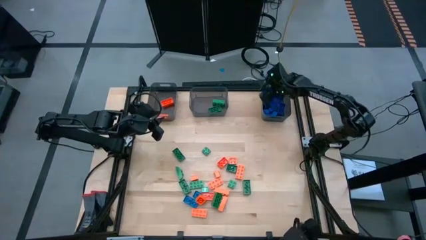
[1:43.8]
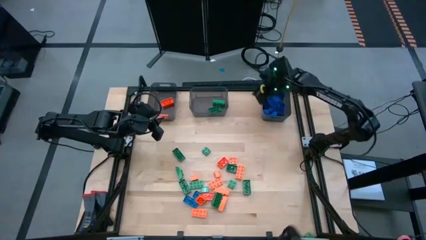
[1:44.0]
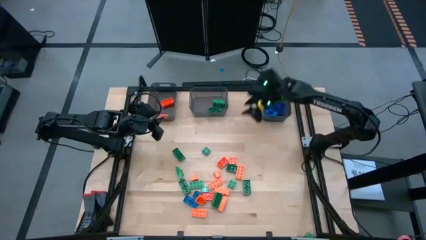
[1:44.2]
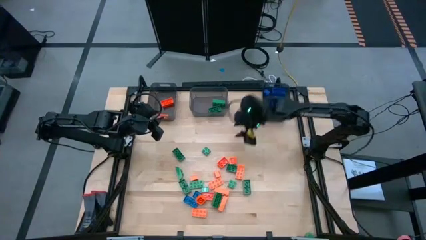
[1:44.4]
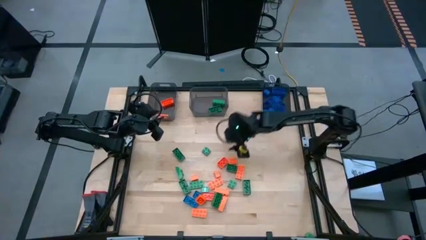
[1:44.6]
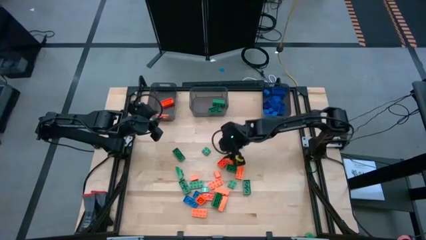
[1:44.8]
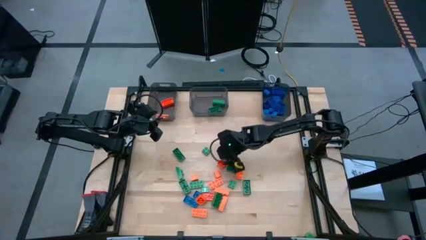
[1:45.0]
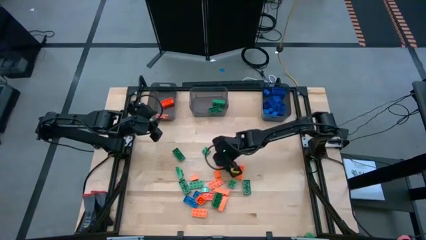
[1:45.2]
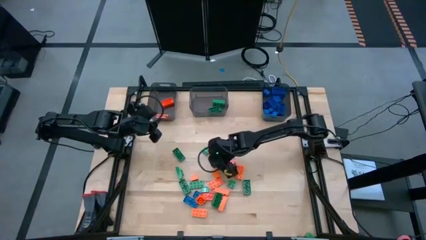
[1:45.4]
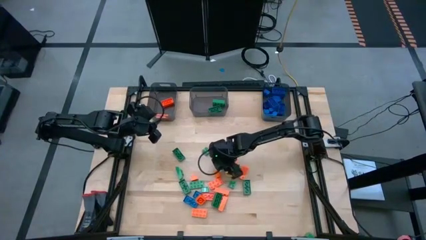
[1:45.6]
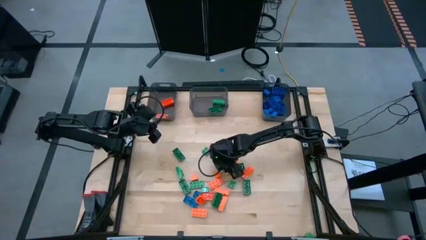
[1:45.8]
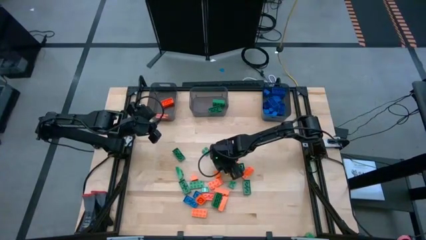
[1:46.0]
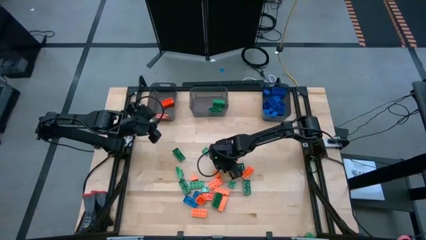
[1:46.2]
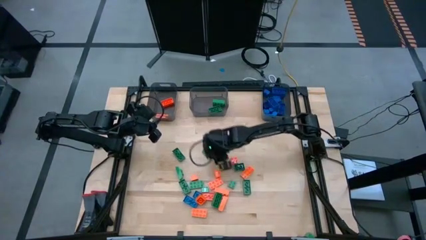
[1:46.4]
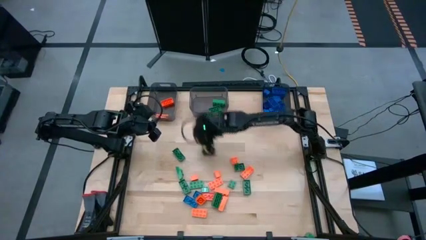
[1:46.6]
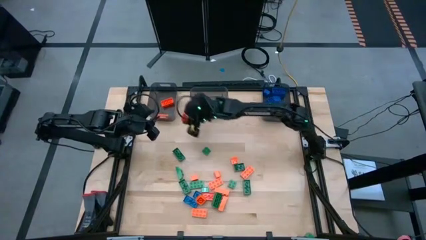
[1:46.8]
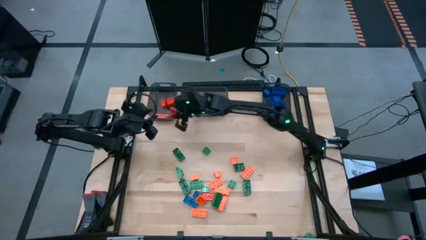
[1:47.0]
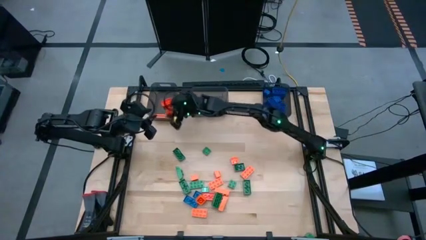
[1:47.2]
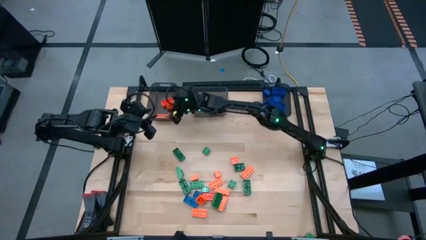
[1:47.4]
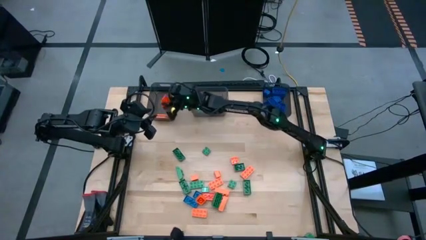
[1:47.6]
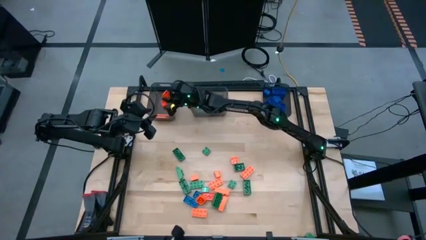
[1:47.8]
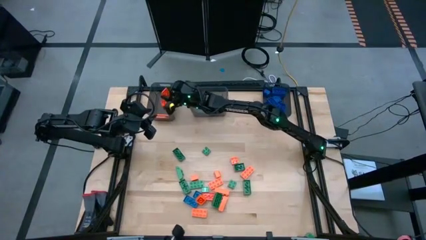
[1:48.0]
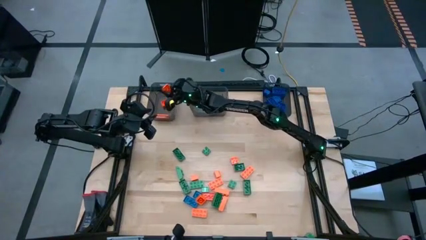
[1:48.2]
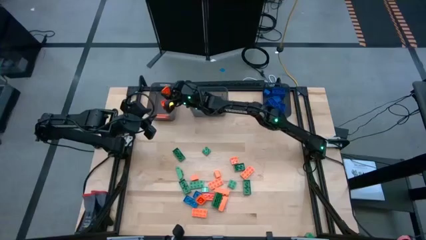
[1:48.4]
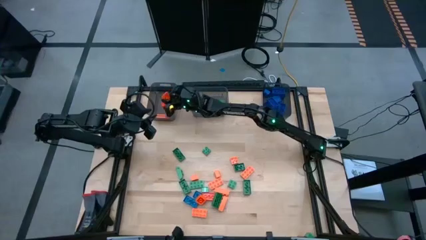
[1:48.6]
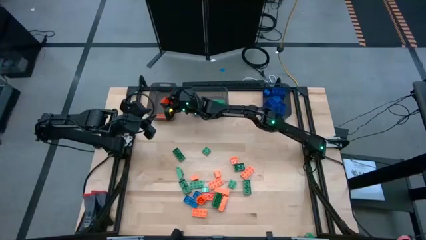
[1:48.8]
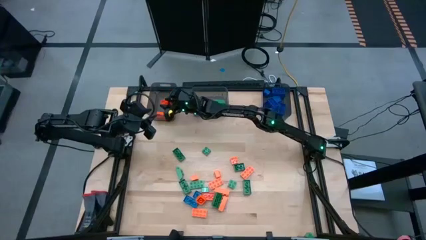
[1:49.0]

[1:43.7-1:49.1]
Task: Sort blocks
Put the orange game piece into the left black bin

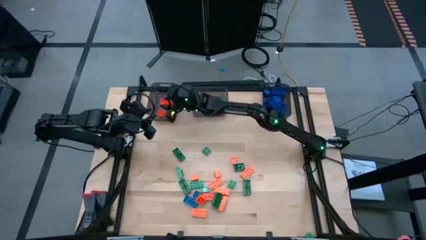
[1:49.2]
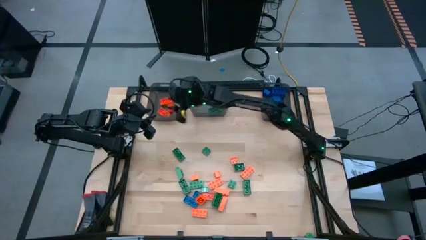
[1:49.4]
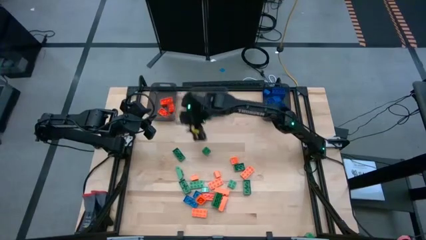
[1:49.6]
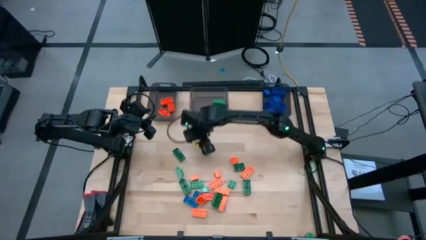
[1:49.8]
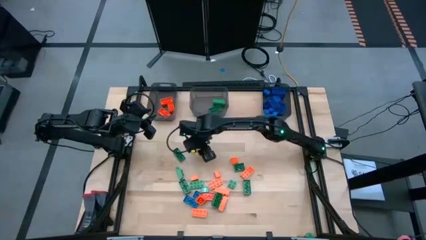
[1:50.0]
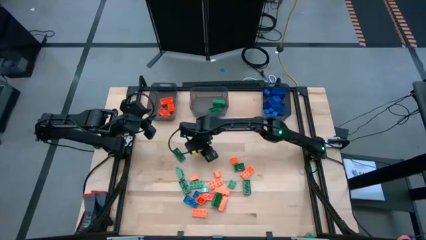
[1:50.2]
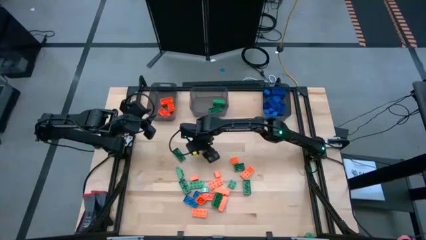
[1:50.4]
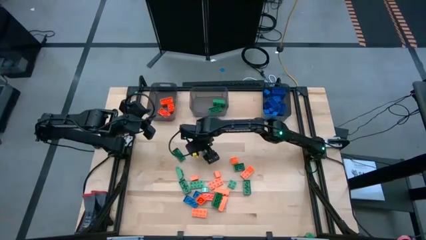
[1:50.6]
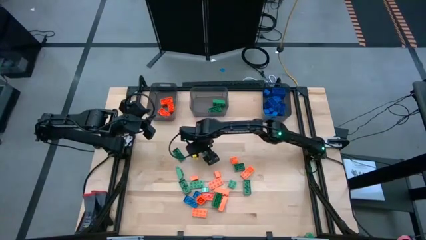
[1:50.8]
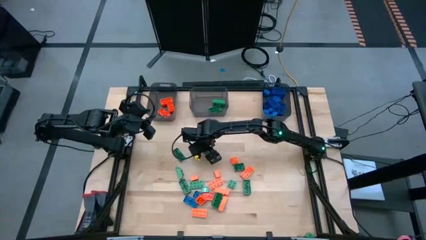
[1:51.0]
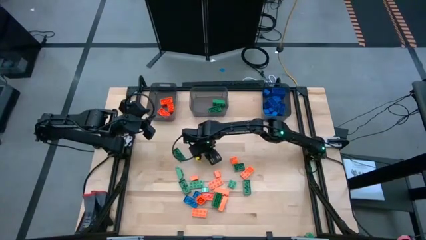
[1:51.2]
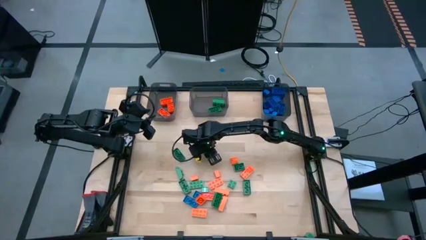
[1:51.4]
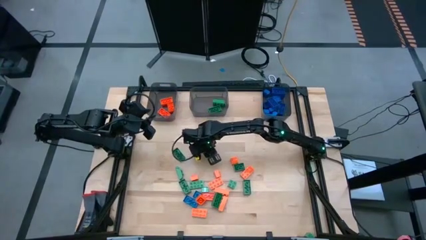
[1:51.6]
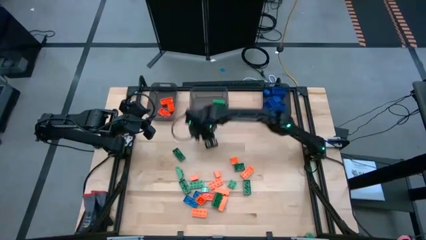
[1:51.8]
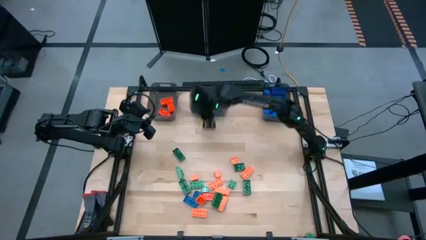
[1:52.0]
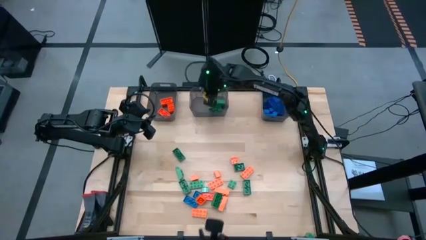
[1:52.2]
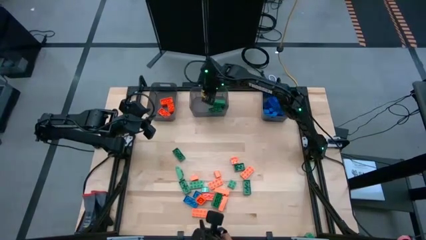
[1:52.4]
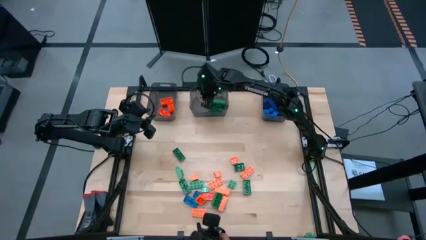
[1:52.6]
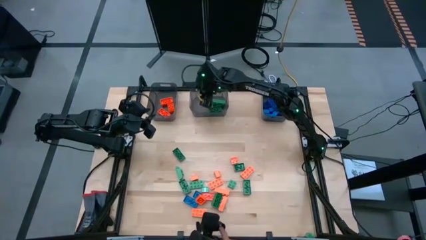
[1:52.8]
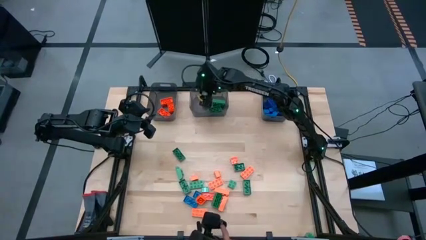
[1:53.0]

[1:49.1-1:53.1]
Put the green piece into the middle black bin

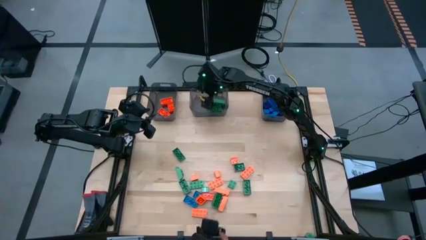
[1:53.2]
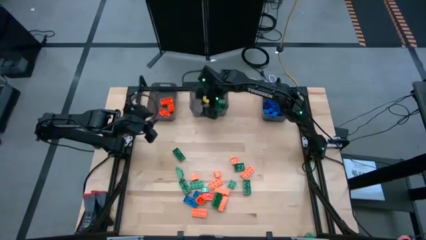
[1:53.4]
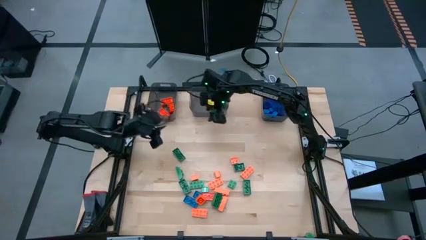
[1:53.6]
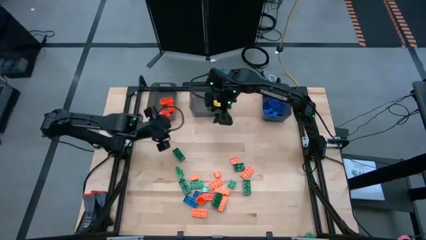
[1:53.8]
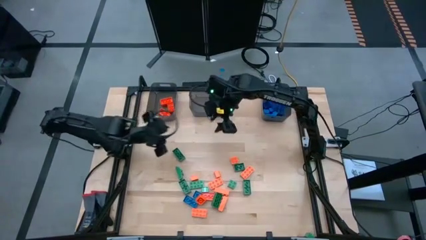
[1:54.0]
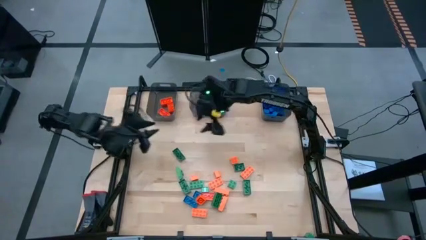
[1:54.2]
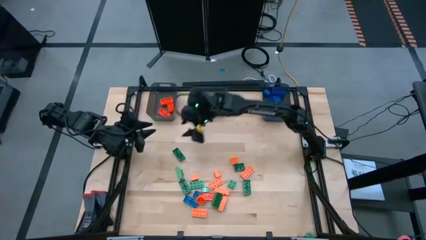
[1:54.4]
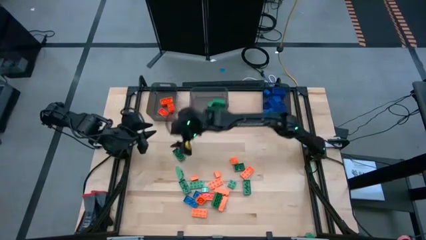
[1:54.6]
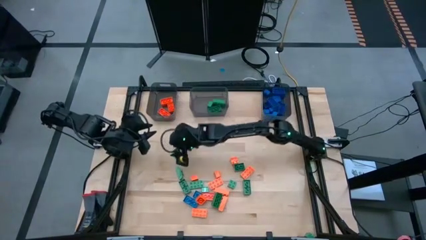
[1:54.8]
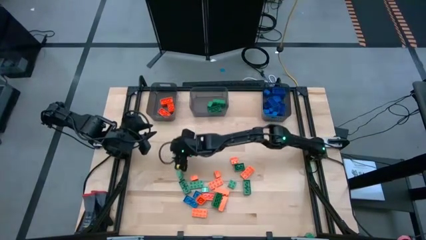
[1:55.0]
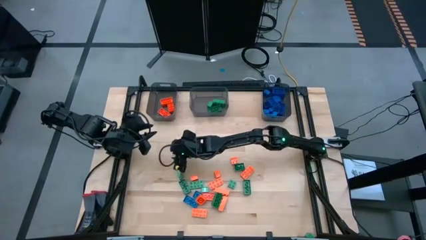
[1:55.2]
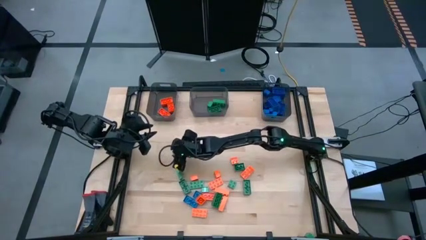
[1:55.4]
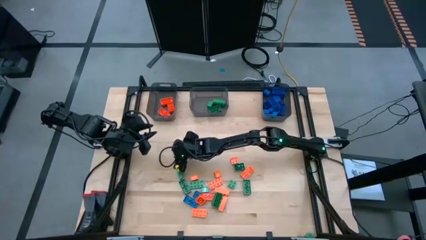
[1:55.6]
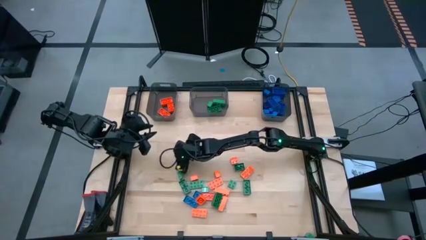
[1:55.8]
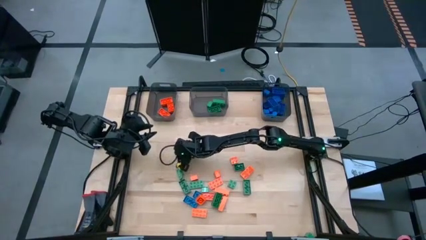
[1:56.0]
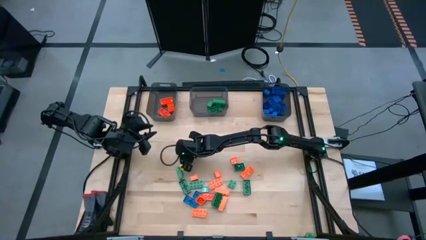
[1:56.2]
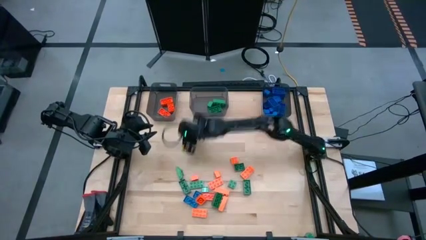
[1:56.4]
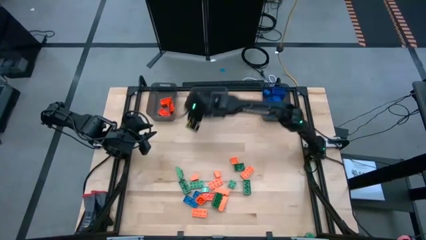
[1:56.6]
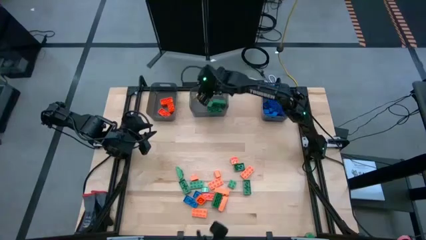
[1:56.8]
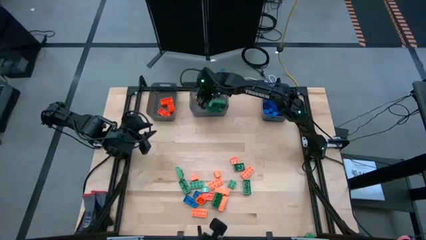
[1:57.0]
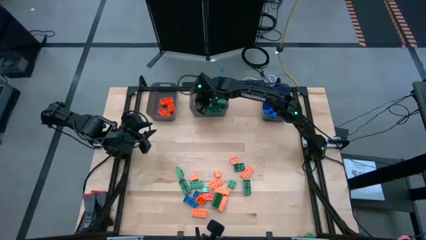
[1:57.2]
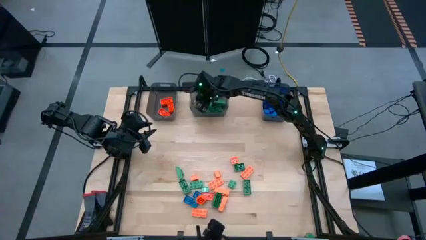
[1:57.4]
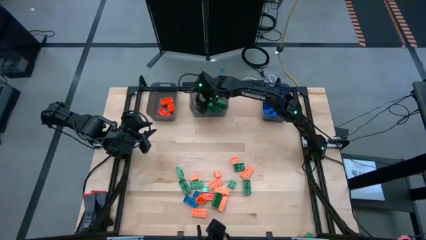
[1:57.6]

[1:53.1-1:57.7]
Put the green piece into the middle black bin

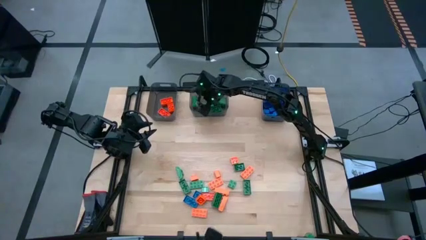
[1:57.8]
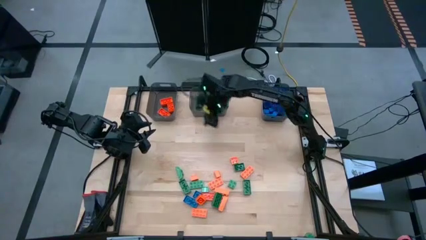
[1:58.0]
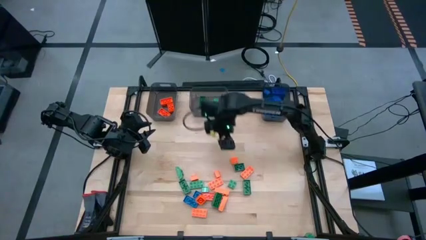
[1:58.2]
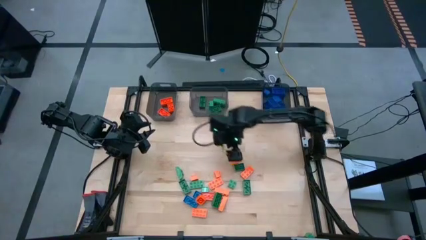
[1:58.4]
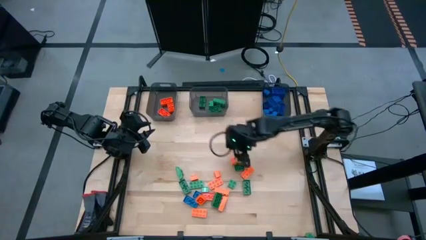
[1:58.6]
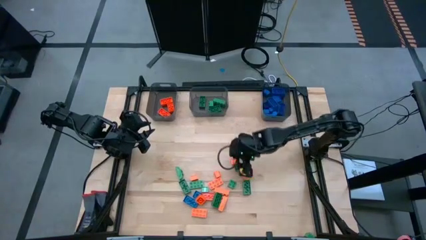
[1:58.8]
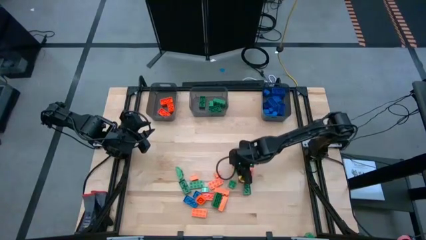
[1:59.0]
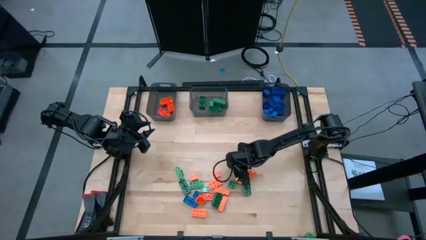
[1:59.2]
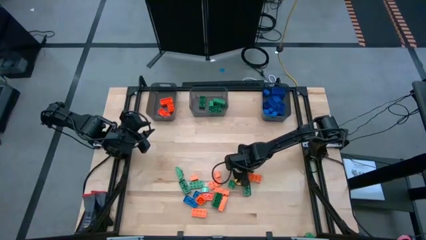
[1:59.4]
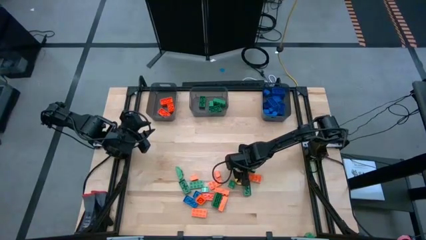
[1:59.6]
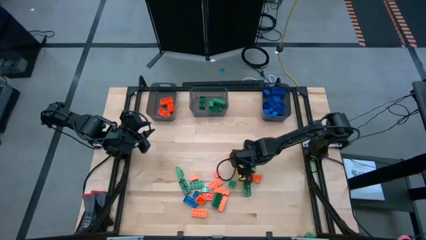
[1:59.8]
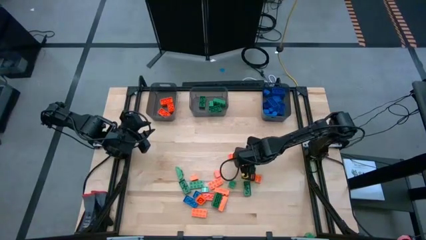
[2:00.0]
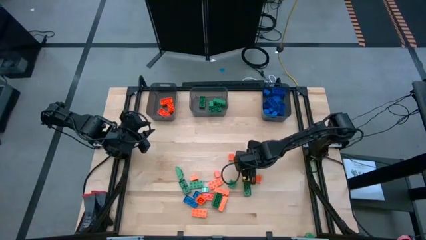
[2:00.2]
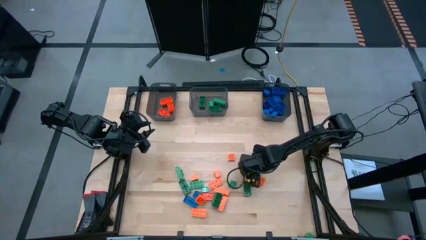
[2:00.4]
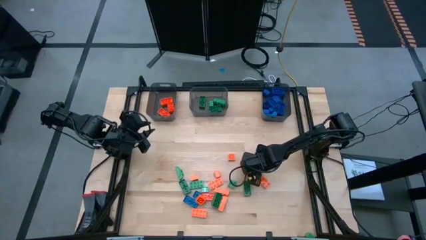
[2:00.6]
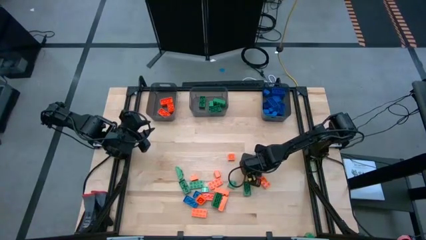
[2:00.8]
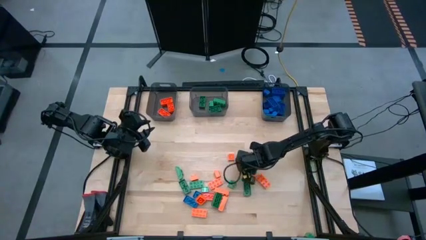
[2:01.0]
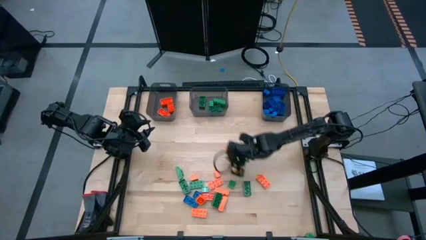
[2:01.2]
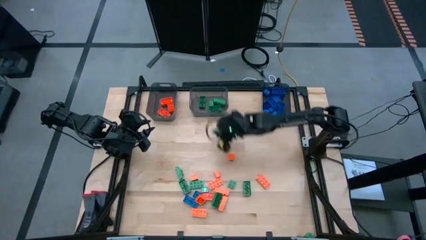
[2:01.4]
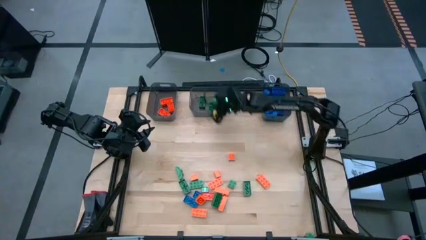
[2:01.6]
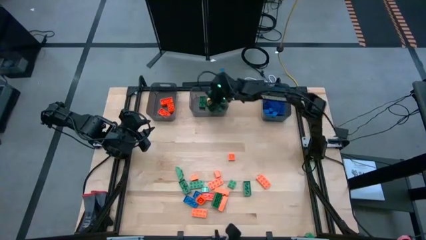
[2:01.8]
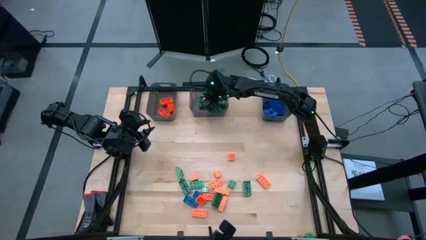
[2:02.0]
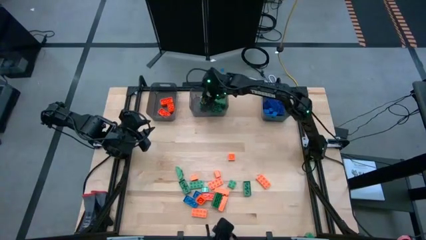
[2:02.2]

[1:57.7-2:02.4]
Put the green piece into the middle black bin
